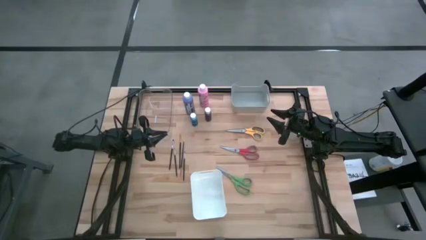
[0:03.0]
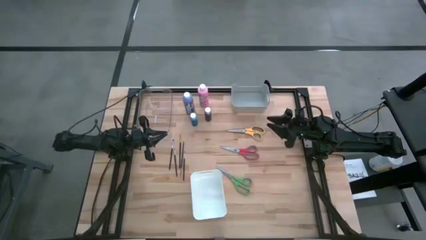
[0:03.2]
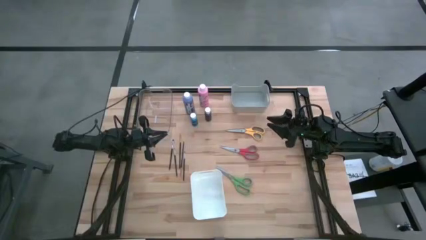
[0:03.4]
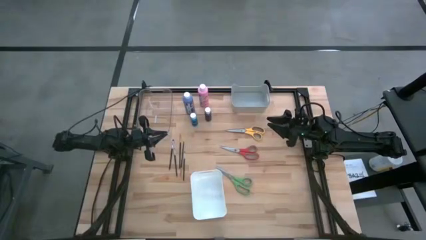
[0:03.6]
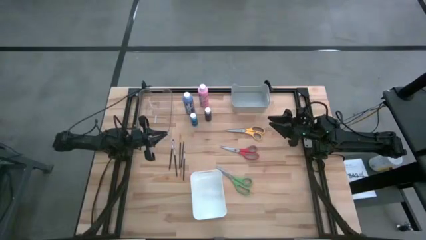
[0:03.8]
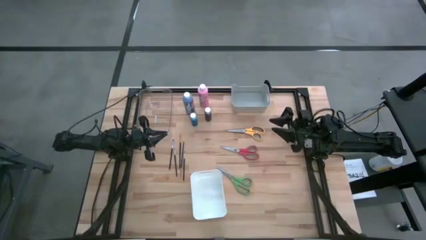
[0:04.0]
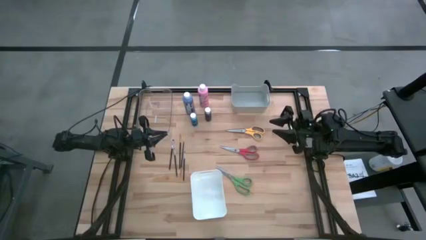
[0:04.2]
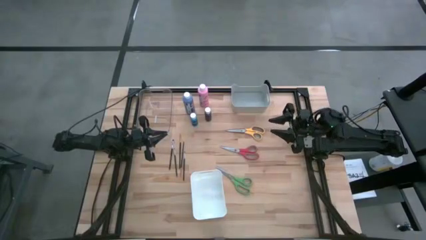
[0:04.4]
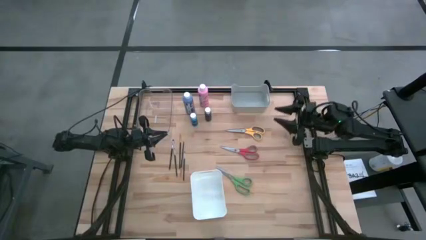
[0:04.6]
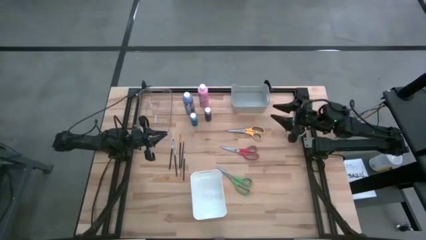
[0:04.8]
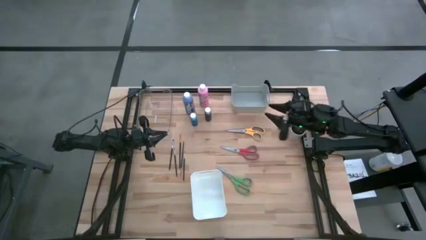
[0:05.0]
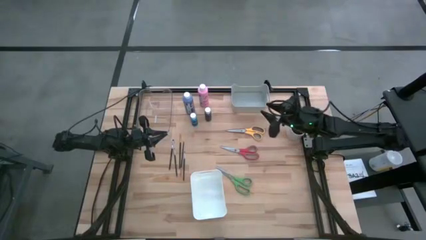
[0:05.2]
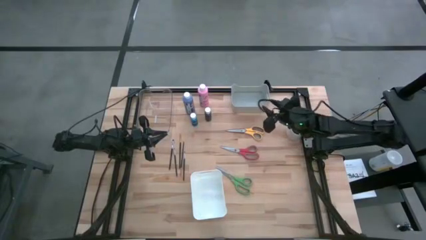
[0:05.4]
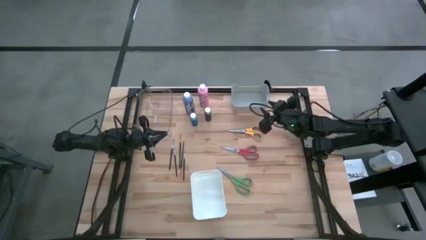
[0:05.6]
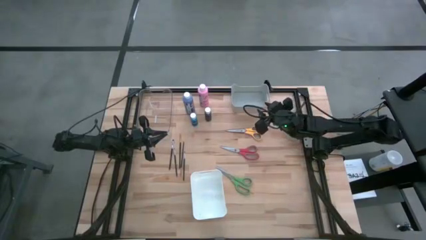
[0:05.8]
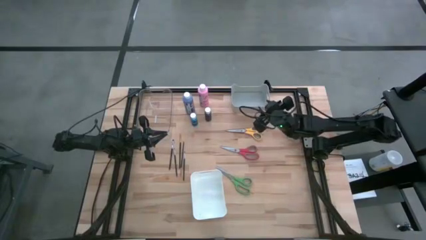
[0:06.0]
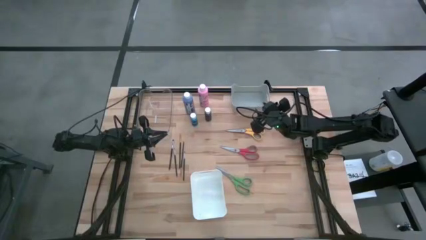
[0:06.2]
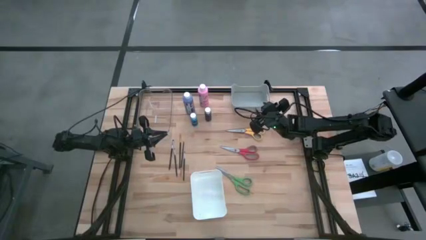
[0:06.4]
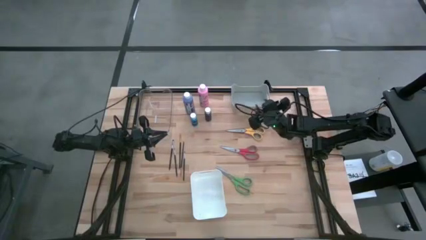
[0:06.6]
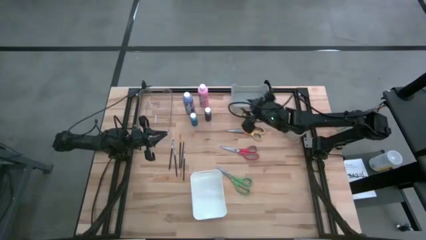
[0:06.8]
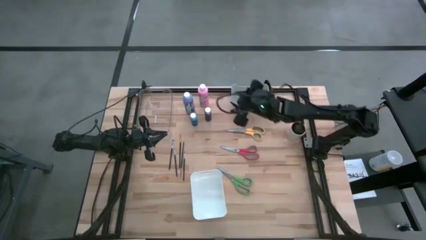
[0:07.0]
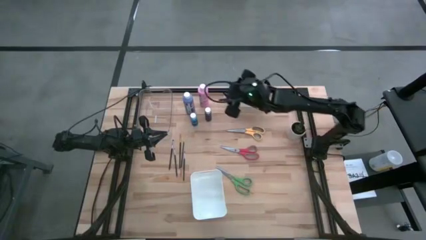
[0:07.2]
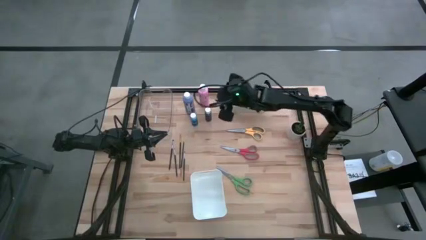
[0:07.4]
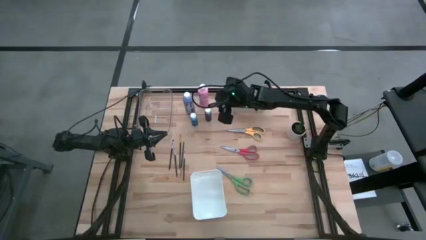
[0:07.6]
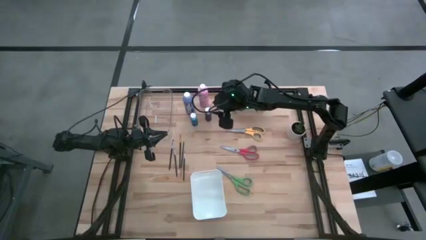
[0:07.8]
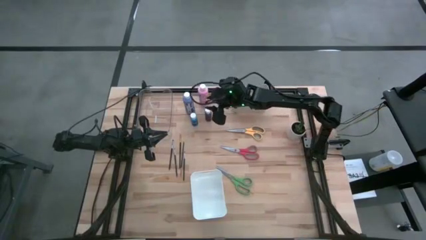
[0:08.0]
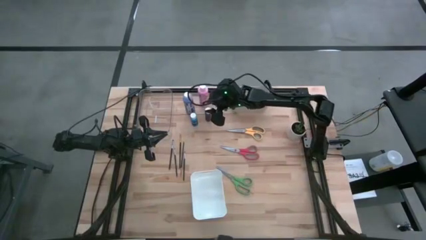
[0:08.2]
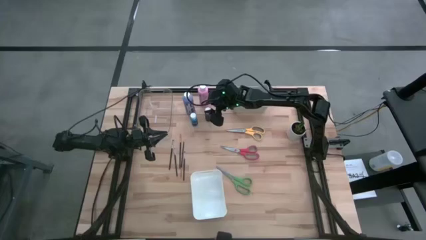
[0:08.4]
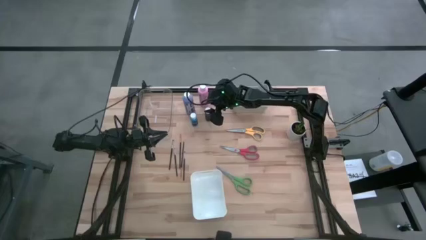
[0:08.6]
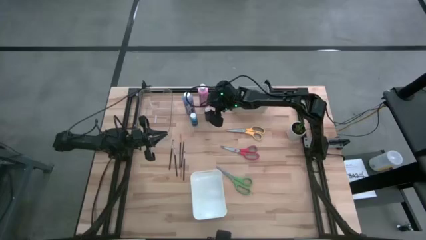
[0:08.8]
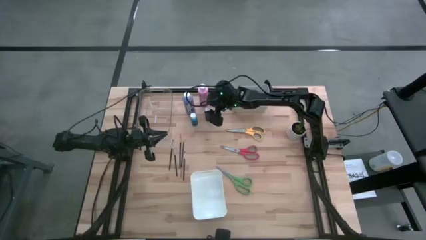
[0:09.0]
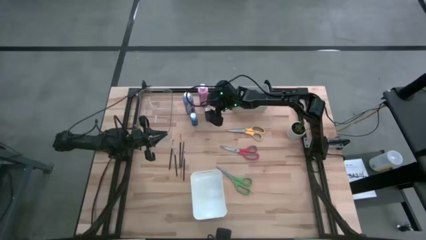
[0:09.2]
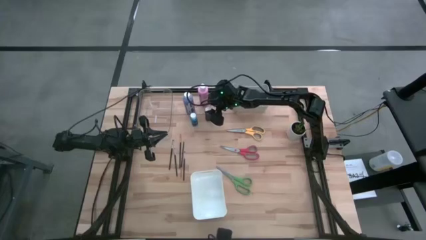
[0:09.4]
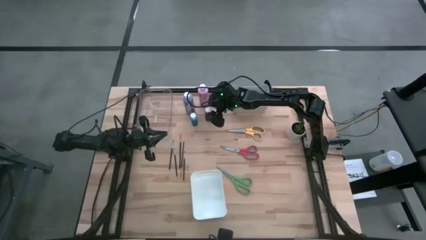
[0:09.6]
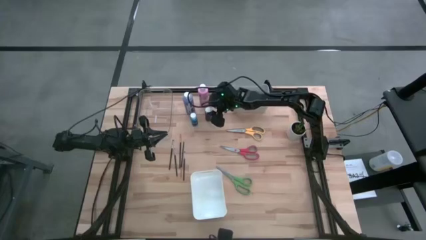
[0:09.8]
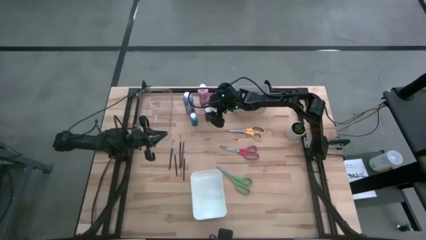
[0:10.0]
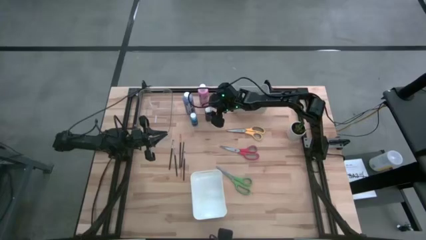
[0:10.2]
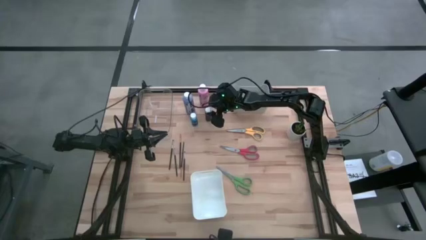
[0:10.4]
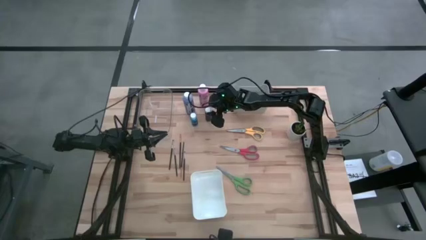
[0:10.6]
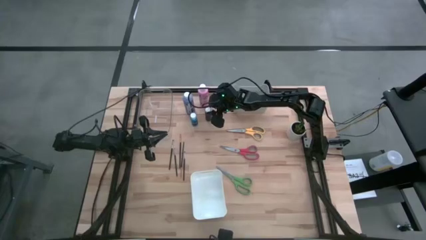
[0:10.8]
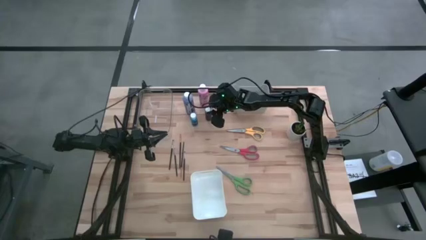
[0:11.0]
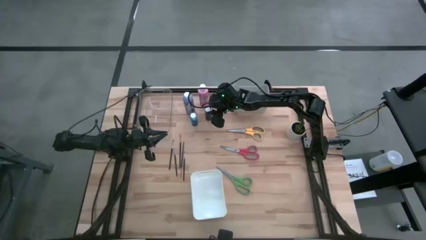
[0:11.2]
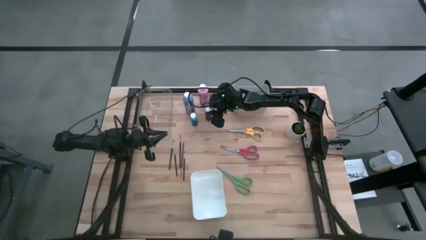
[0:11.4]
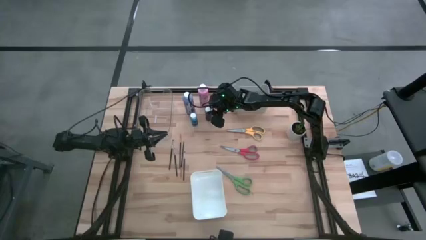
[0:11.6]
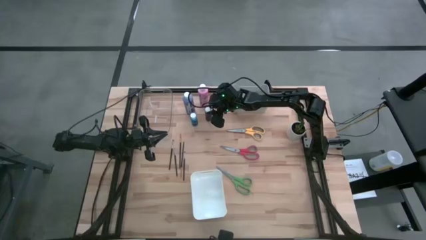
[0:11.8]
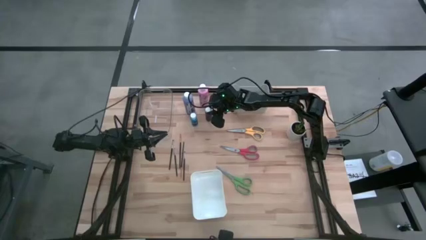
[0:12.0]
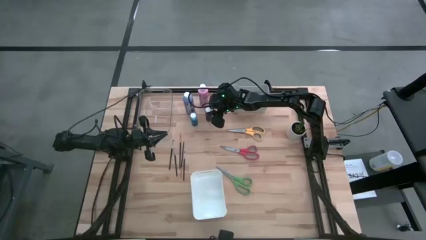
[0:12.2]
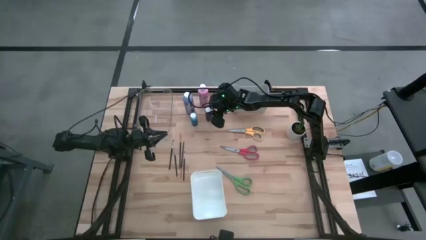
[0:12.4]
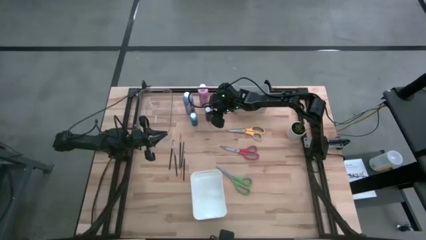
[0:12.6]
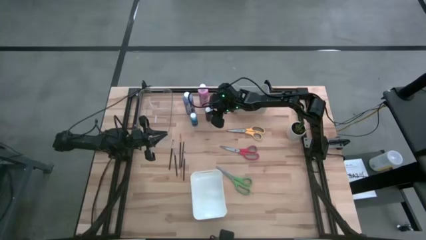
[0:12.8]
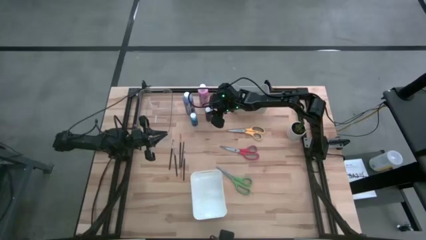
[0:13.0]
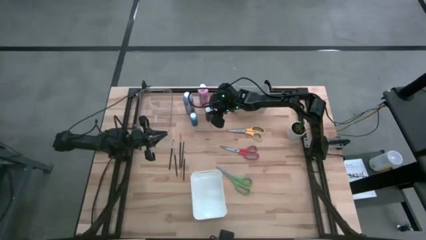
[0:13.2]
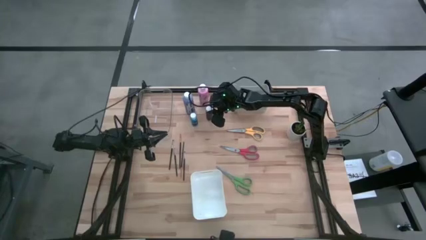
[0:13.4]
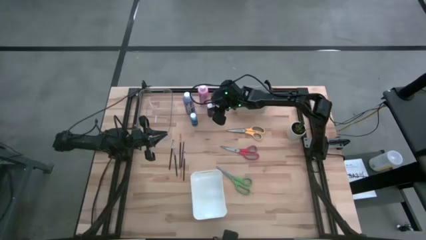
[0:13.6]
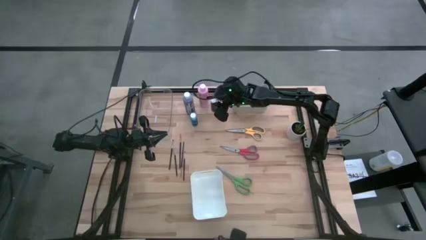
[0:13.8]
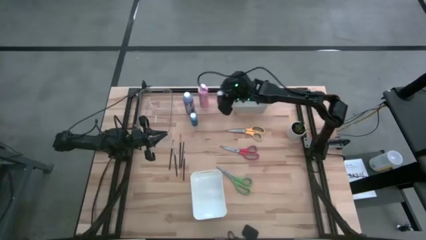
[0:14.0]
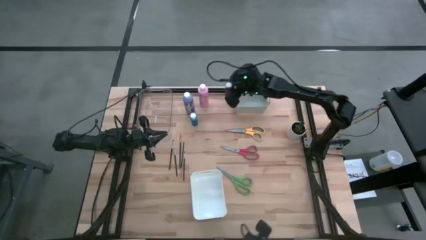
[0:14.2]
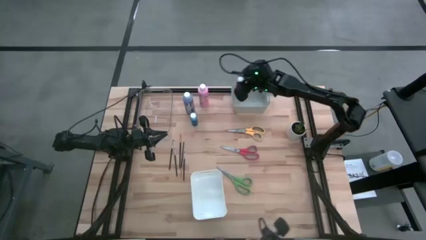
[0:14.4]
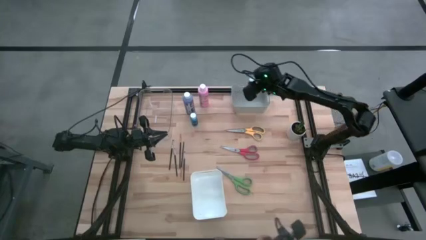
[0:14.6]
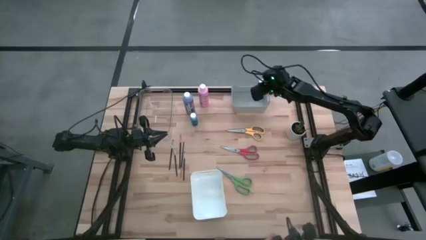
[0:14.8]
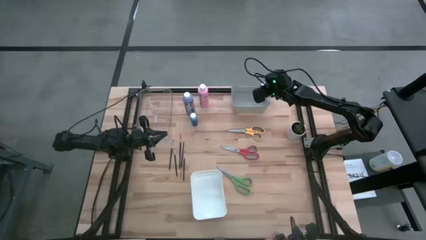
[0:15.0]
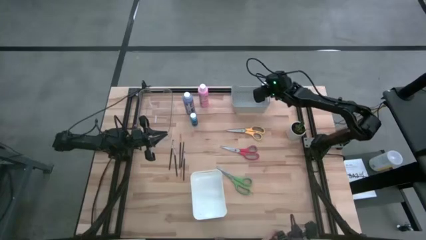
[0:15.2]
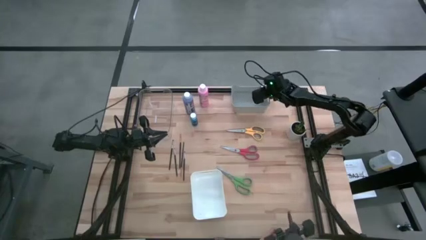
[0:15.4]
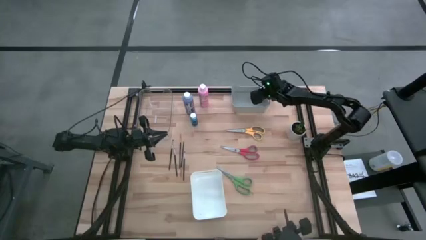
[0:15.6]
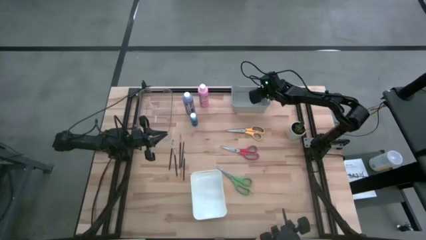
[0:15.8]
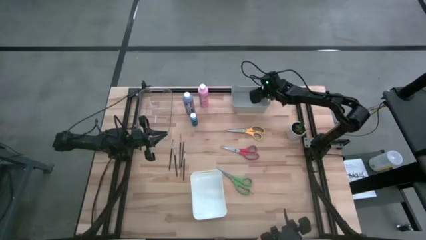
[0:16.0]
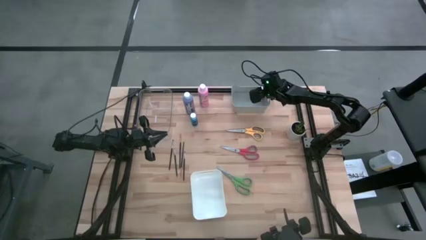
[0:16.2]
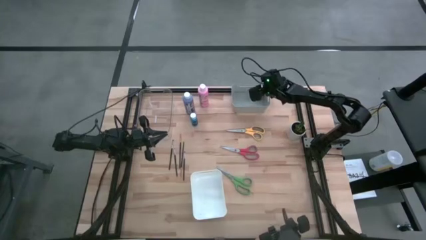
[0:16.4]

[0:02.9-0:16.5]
Task: Pick & Place Paint Supplies
Put the small dark blue paint bottle into the gray bin
